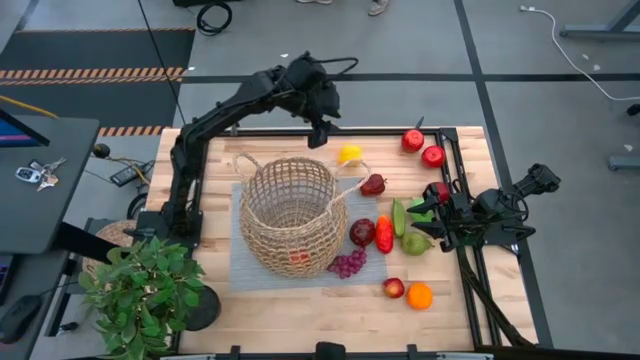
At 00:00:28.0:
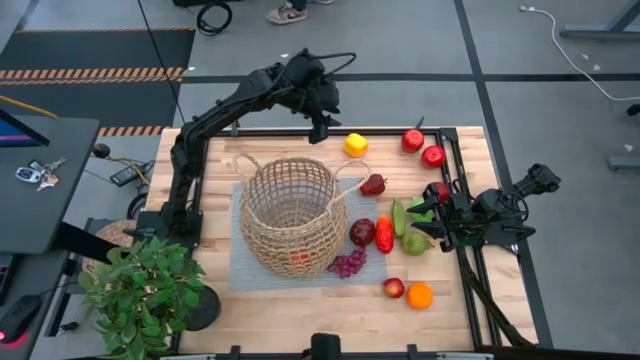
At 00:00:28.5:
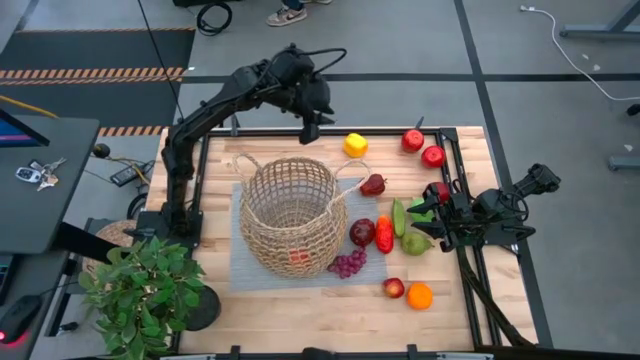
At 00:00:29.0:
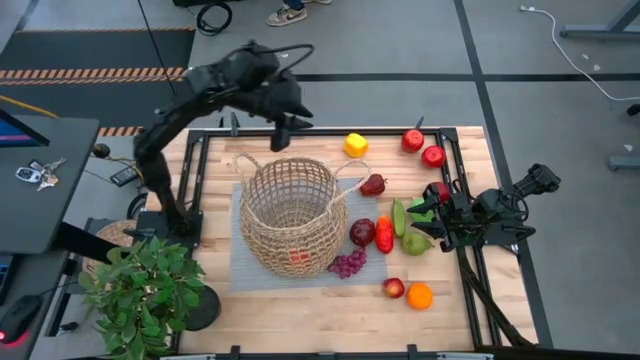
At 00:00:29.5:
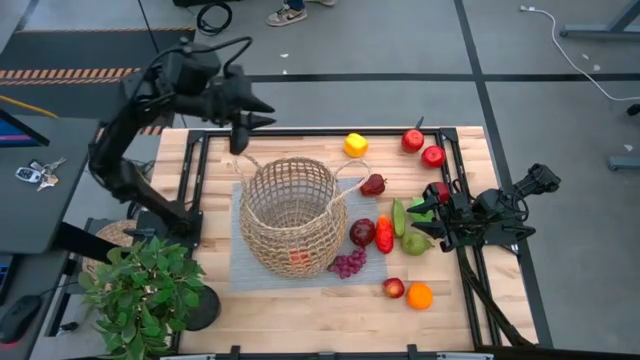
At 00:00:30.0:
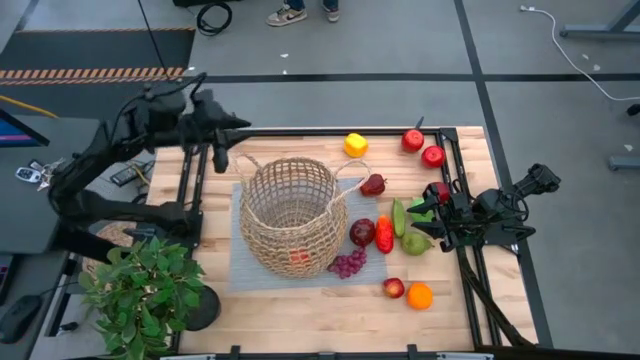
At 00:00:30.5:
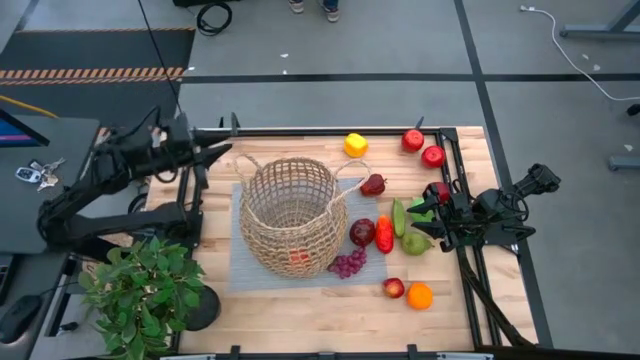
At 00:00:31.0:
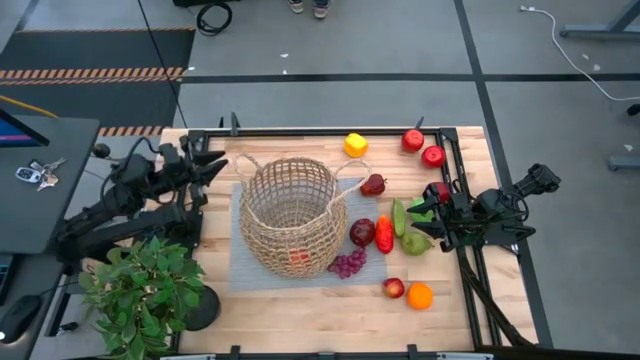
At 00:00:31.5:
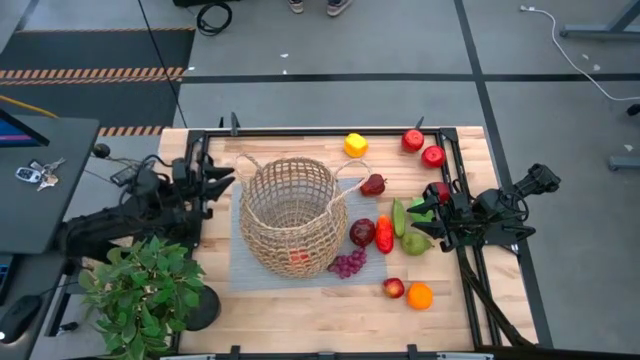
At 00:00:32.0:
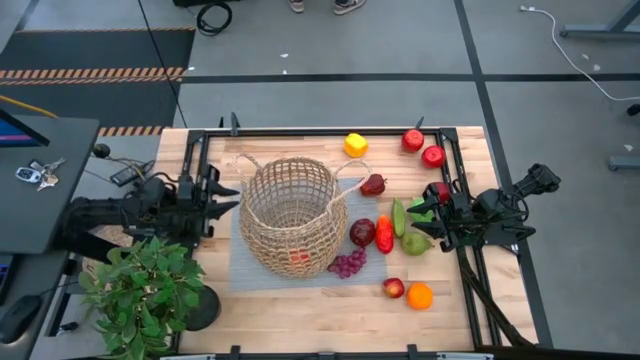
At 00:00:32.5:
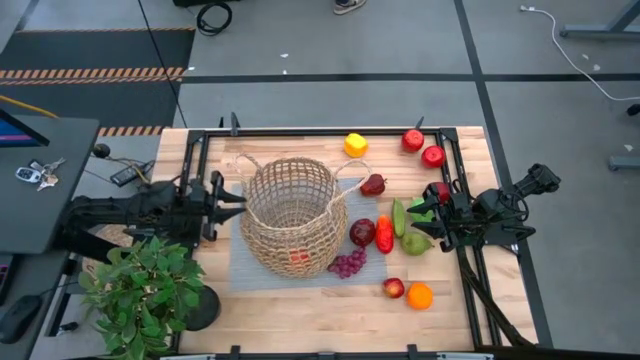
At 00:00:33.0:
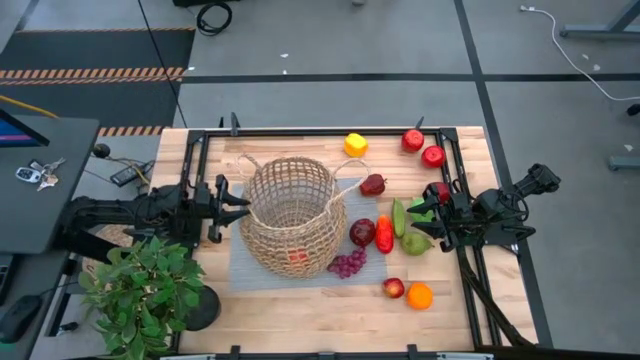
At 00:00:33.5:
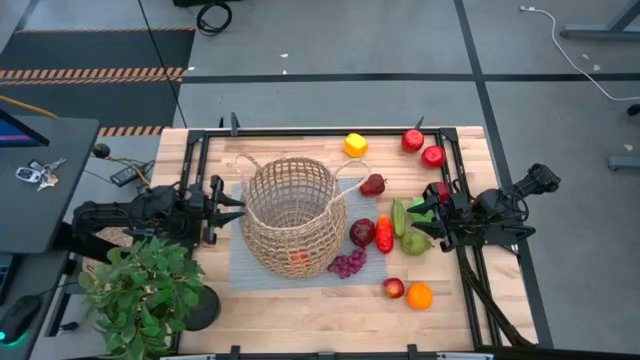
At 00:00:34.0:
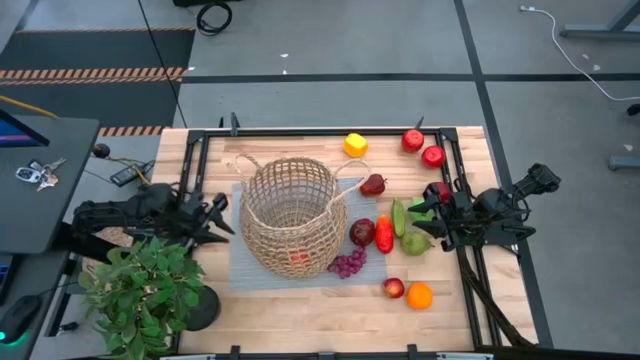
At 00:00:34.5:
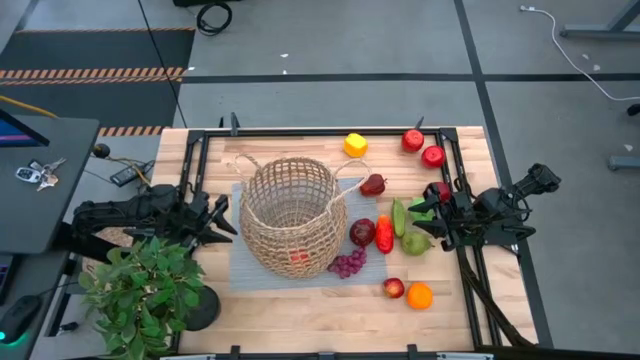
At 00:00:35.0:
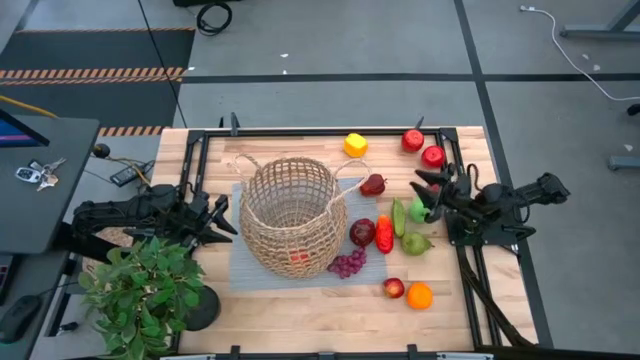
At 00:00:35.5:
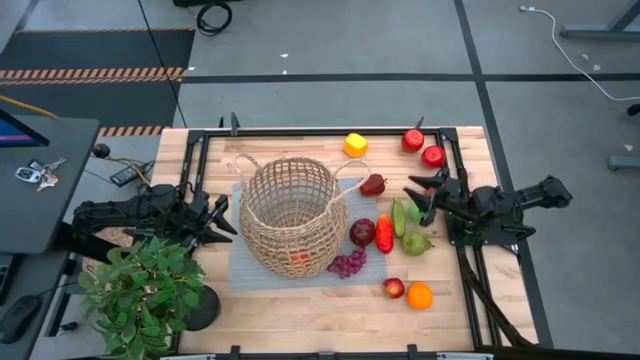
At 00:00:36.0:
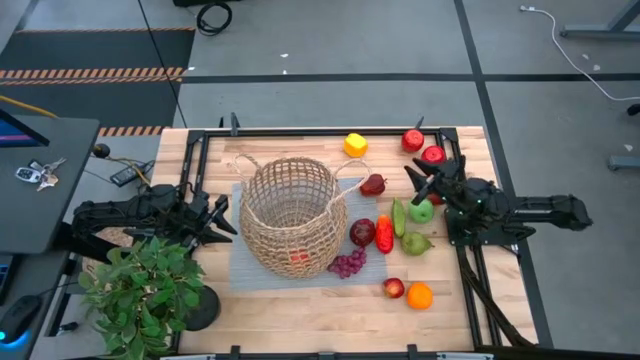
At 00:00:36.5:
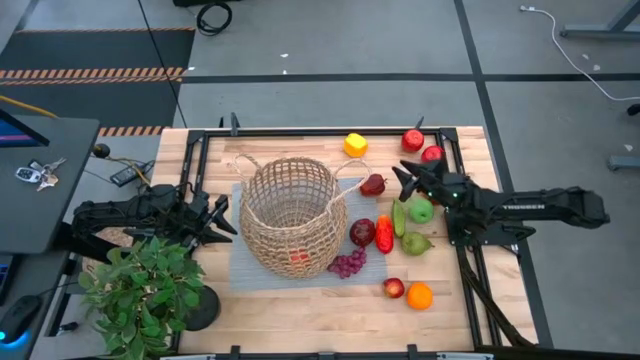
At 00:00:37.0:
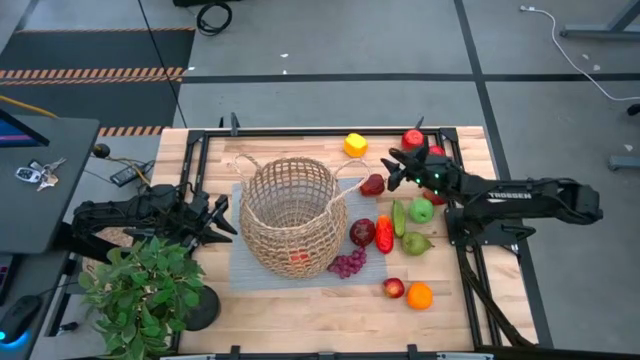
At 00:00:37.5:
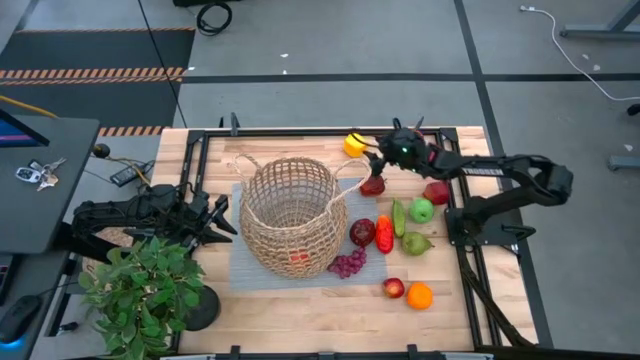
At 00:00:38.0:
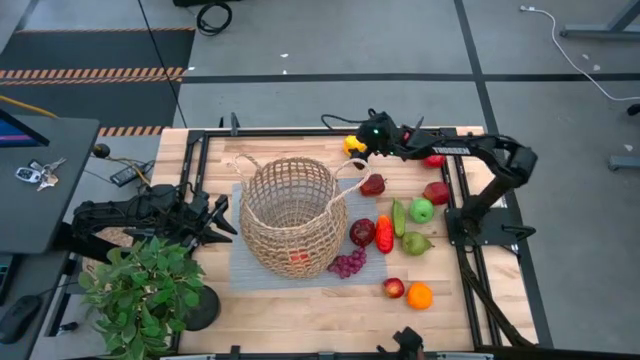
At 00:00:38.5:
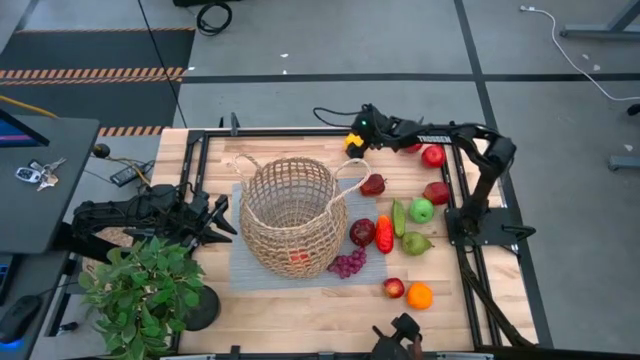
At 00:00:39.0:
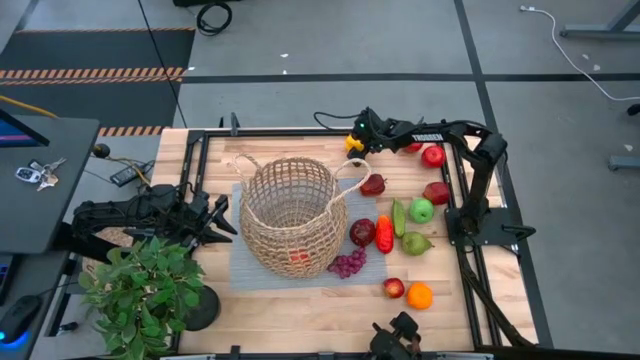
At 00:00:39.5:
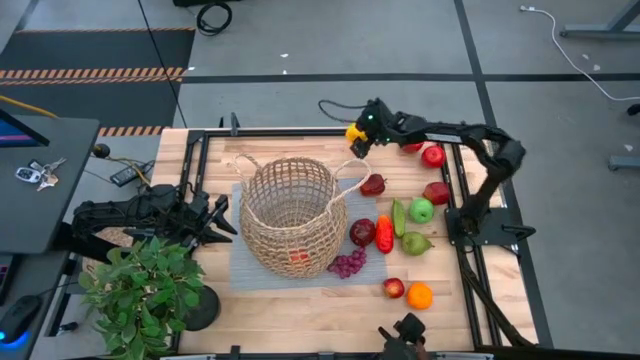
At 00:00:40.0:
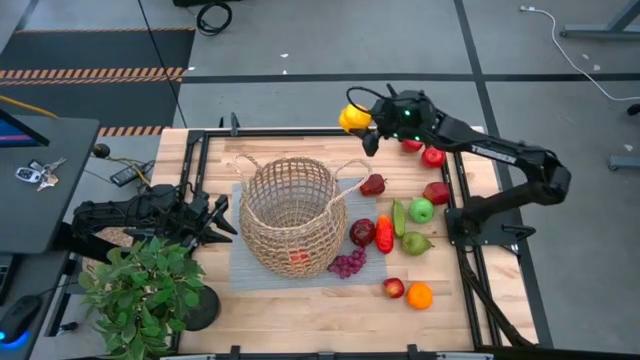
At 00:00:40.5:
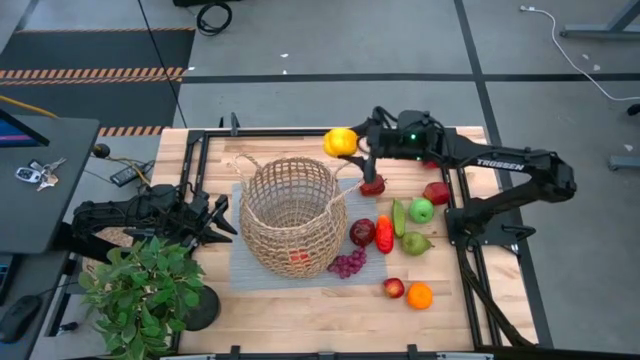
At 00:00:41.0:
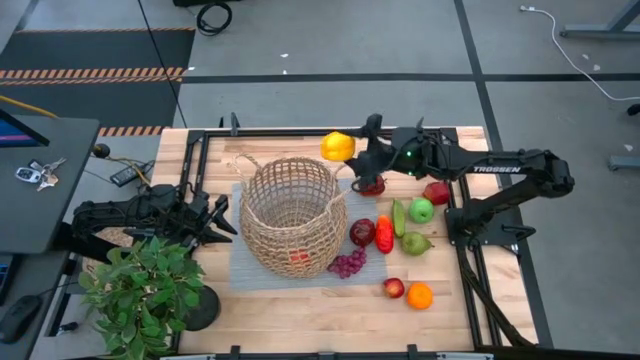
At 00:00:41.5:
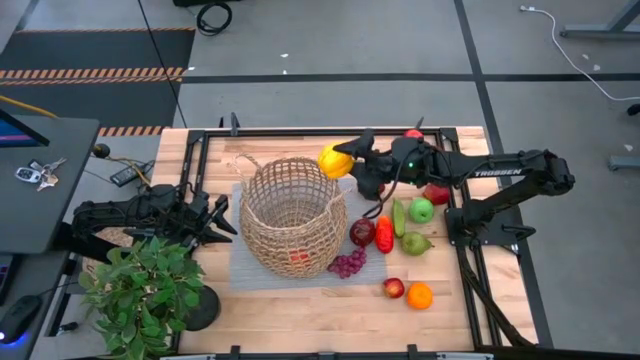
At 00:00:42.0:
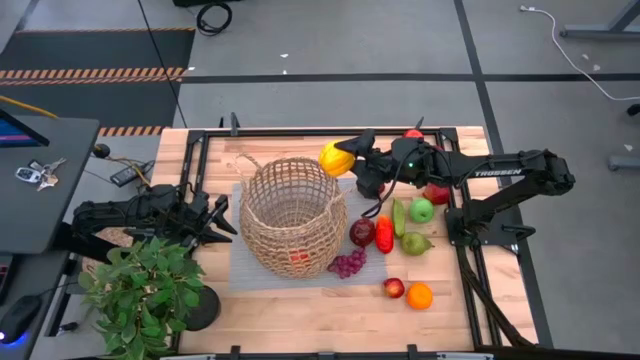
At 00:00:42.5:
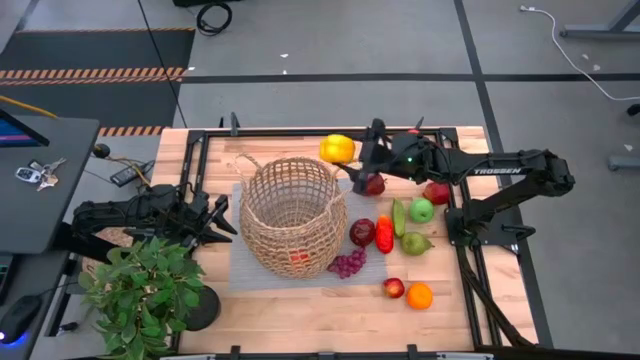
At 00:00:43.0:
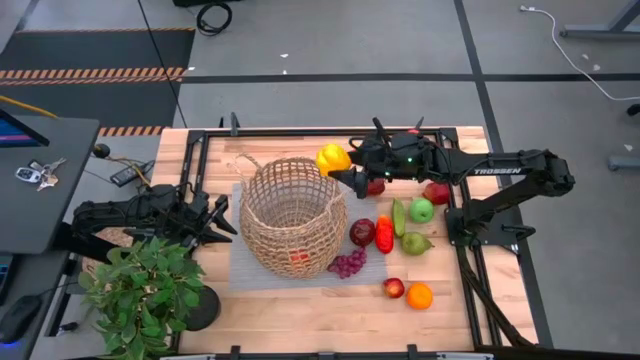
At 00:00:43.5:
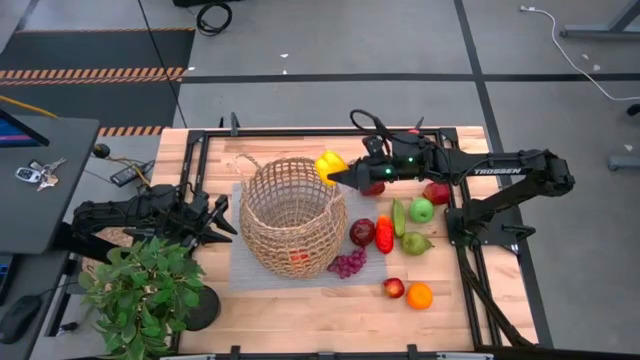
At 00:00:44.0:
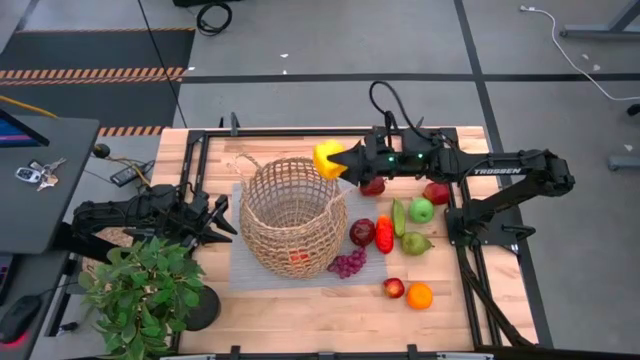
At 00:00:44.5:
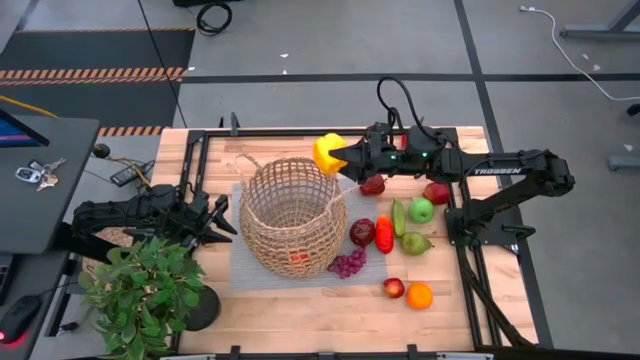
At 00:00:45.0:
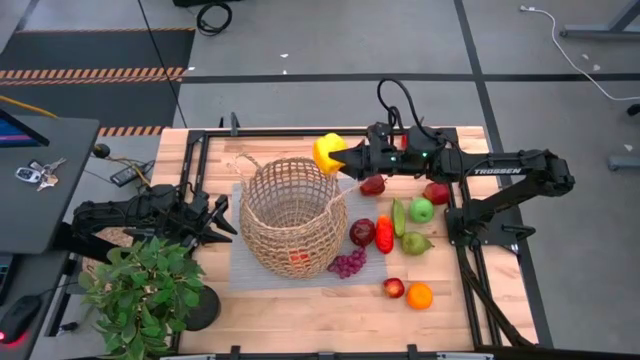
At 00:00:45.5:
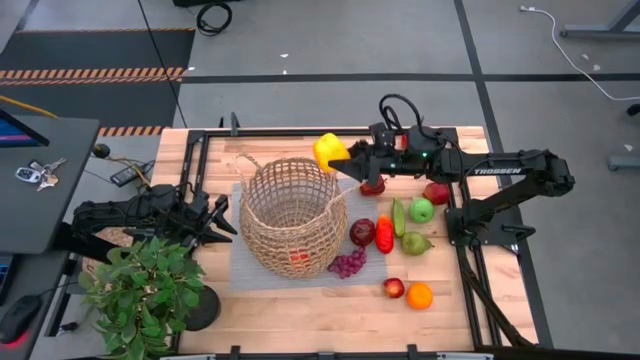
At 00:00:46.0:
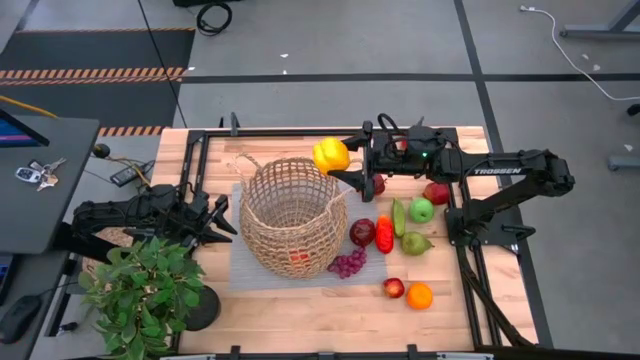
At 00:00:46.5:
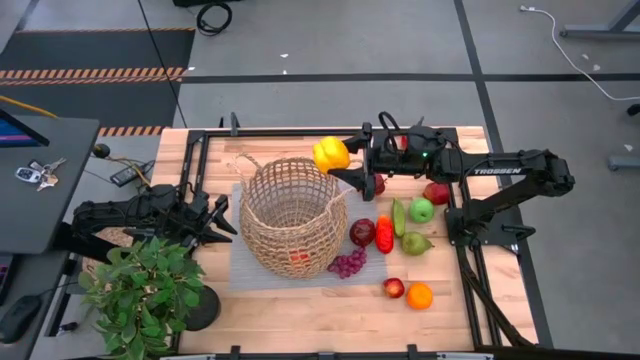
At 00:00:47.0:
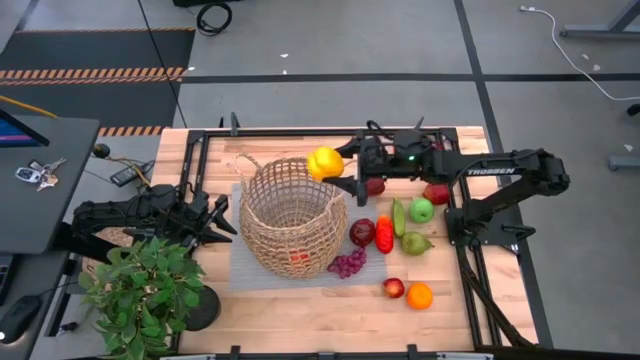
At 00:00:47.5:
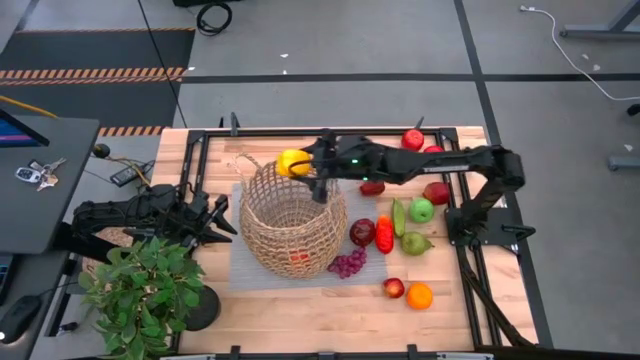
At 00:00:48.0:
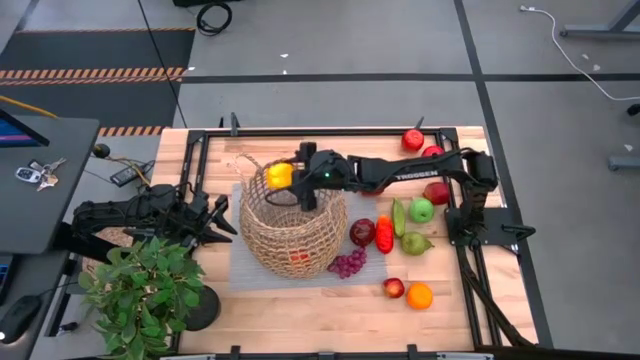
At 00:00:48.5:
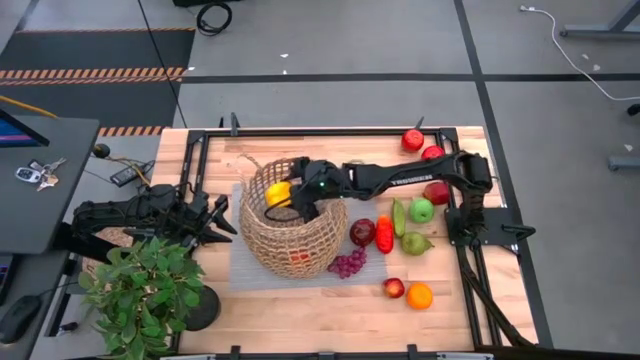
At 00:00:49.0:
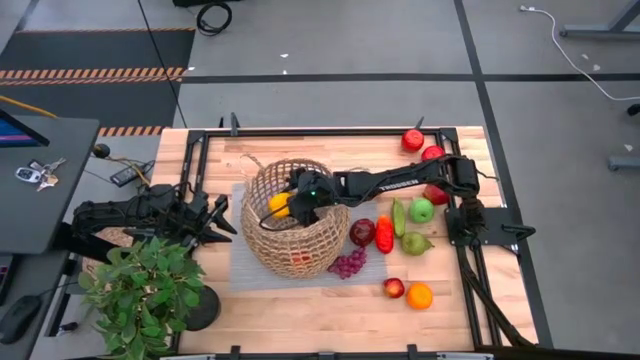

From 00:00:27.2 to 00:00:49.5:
Task: Build produce basket
Put the bell pepper into the brown basket
